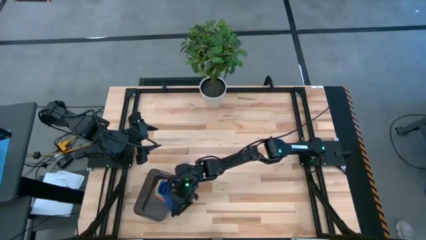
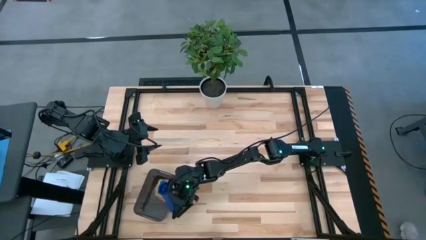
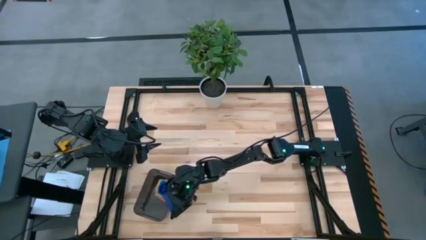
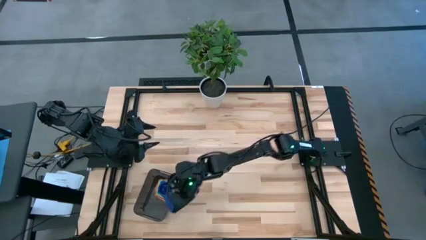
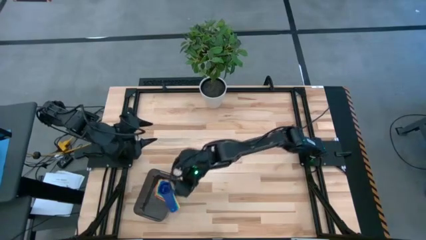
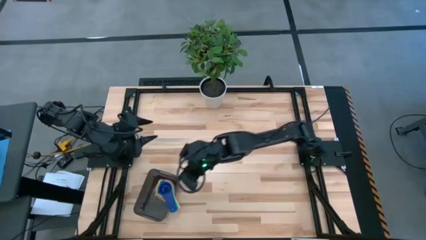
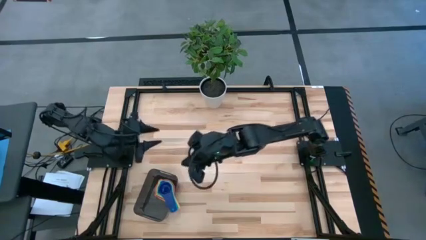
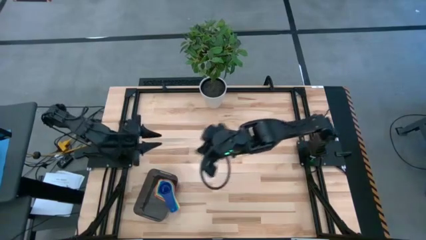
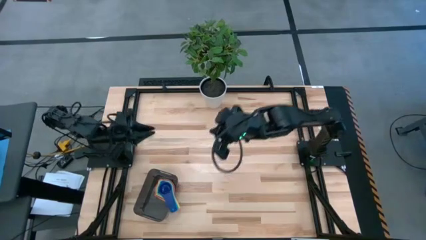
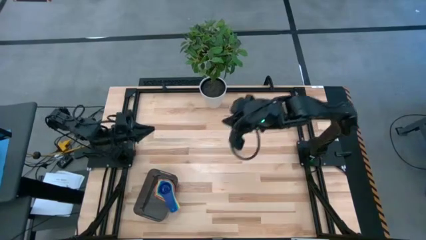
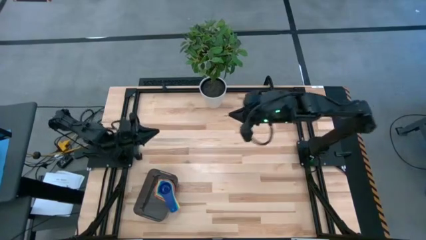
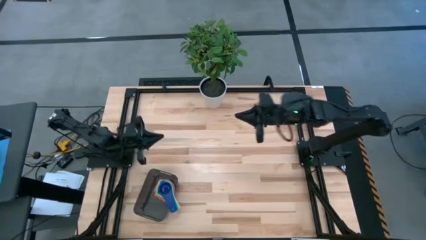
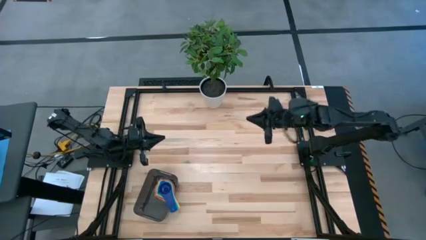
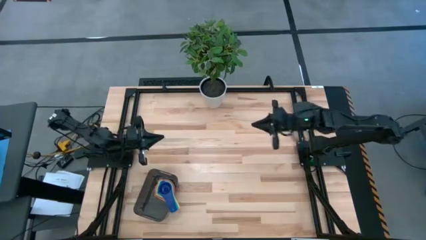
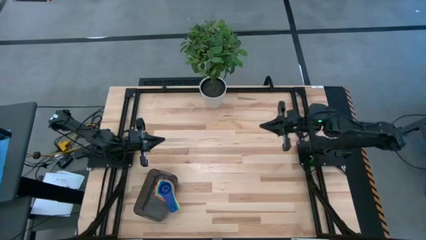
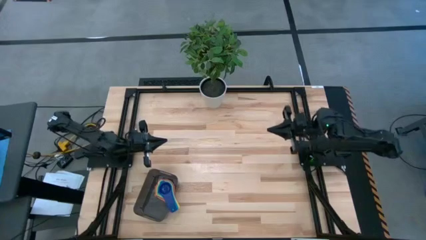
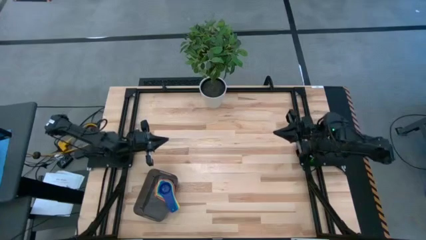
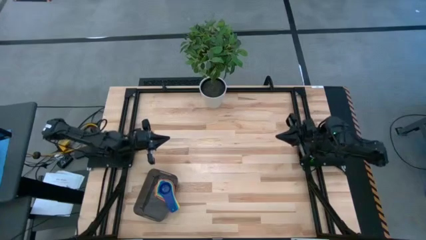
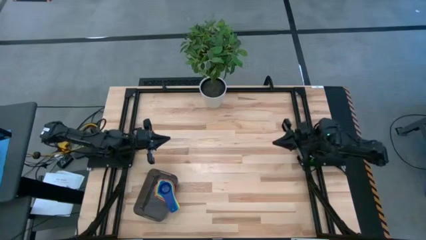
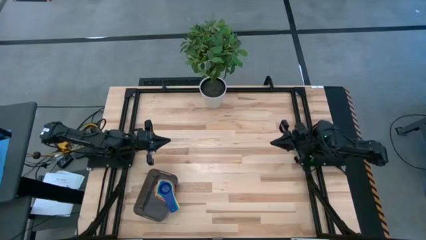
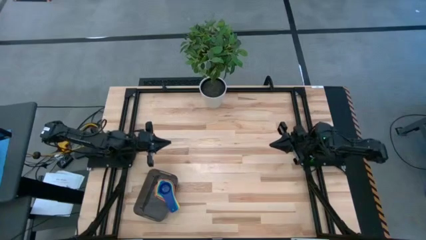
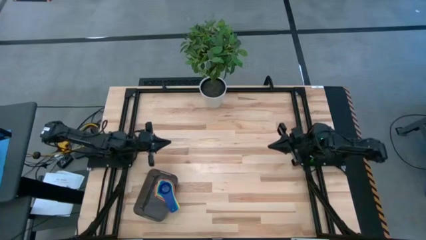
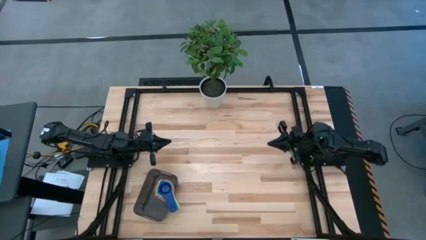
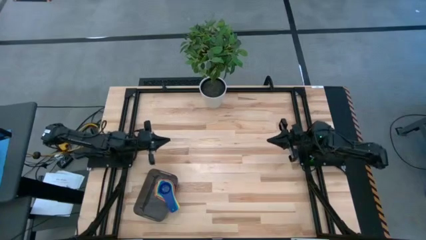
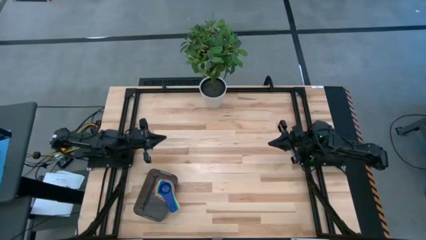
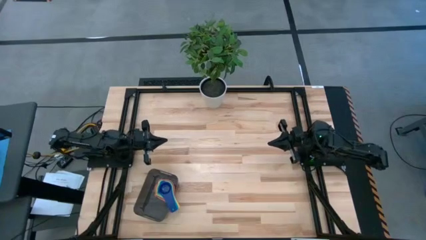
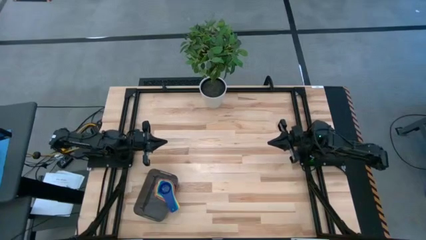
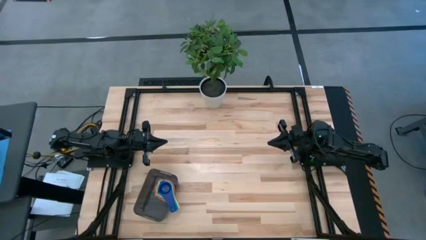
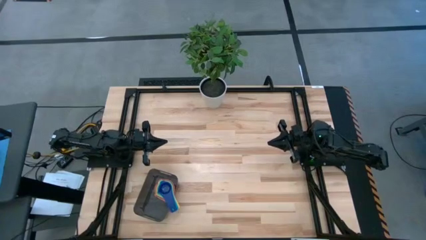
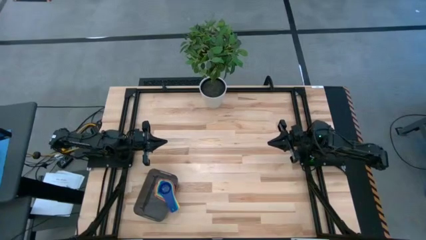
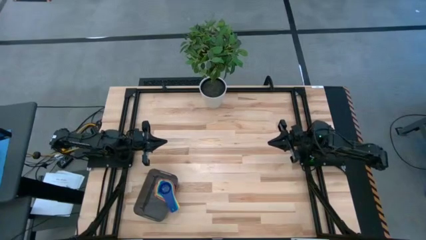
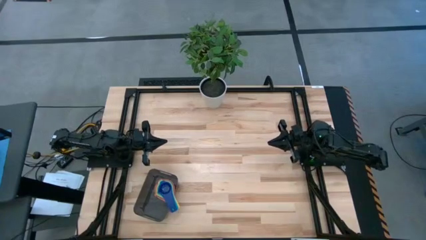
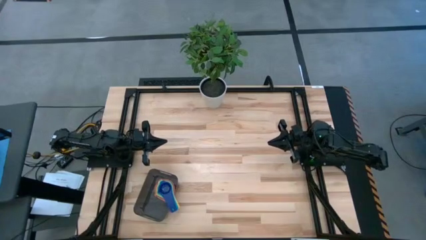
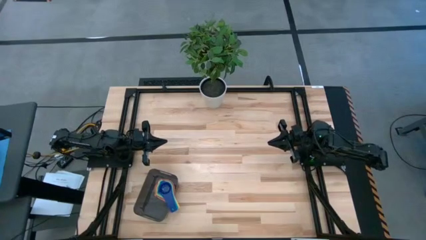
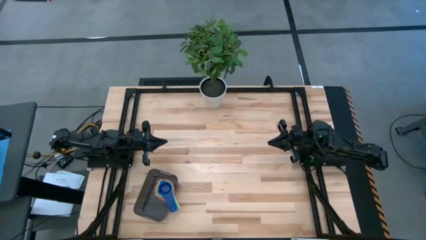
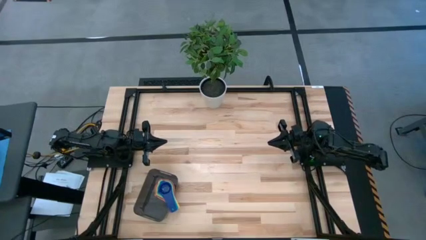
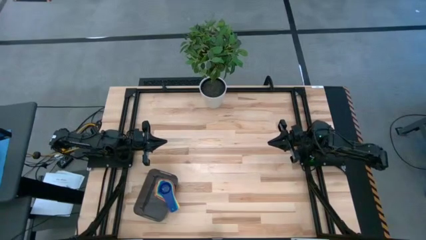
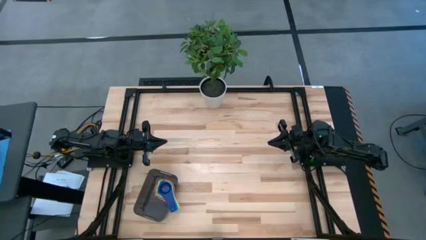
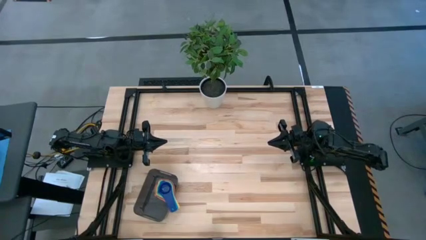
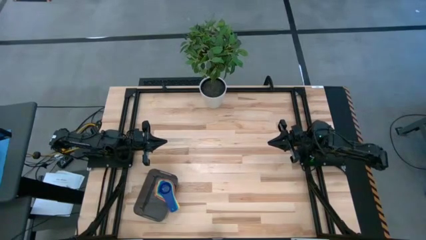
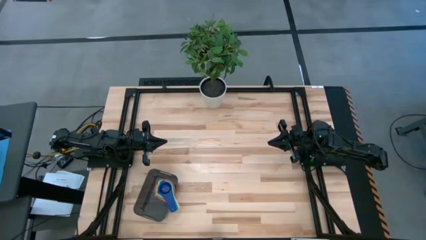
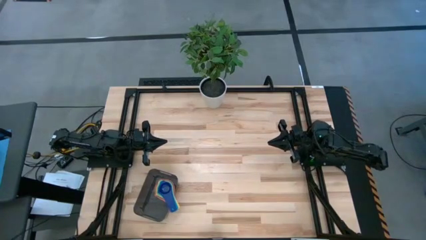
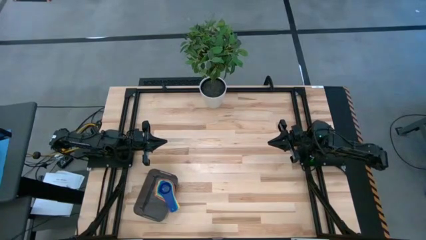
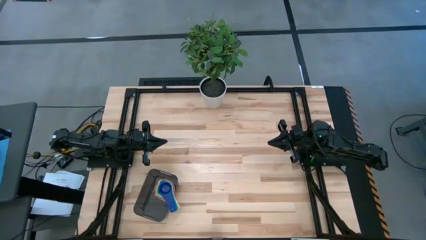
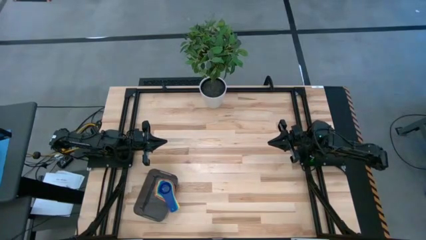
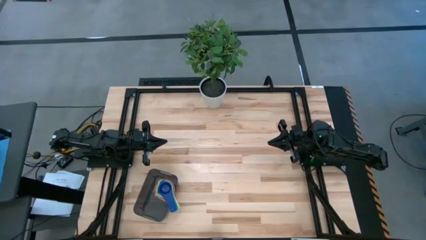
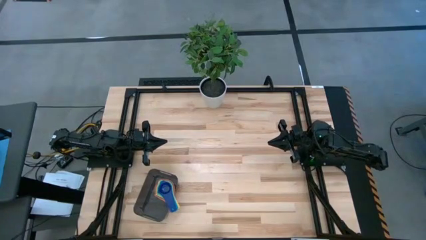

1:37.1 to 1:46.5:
Task: Nest measuring cups in basket
Return to Home Position

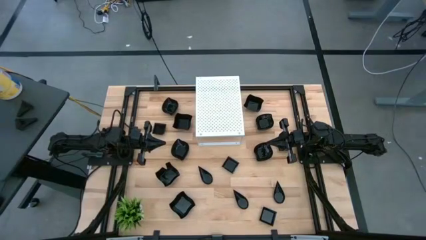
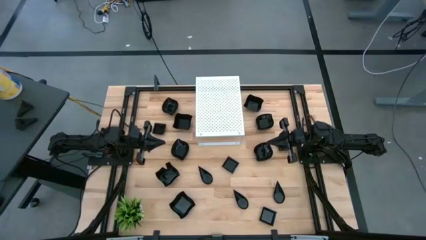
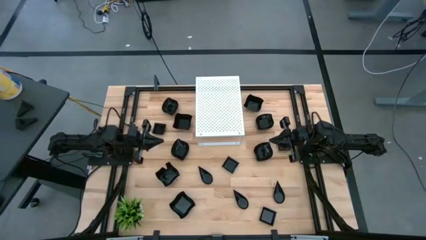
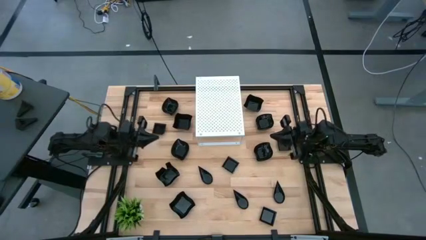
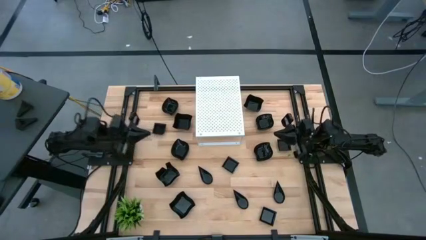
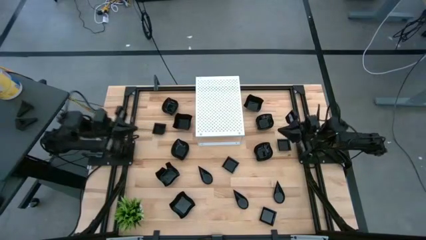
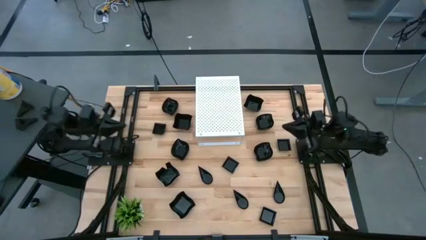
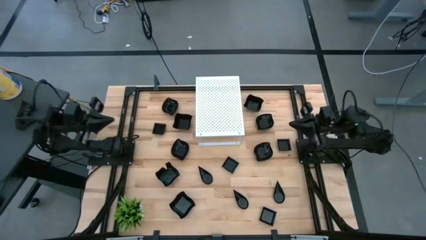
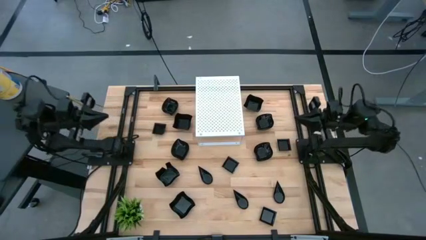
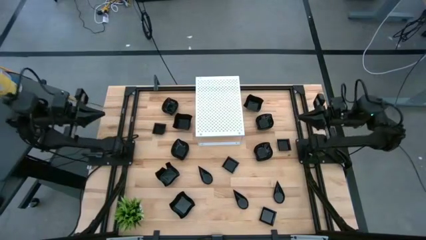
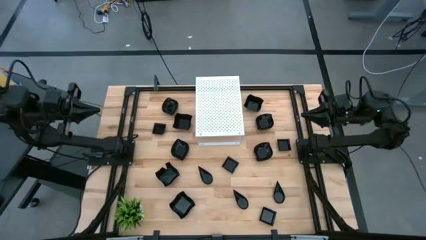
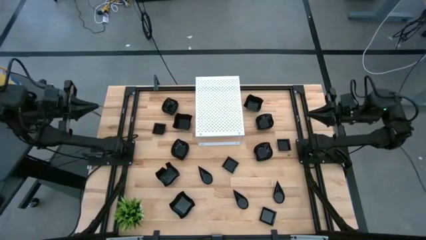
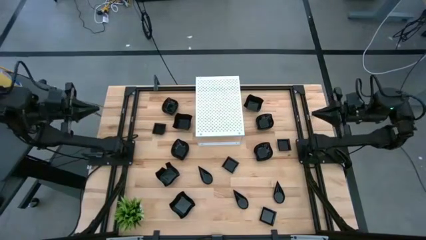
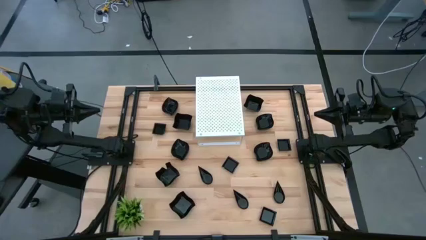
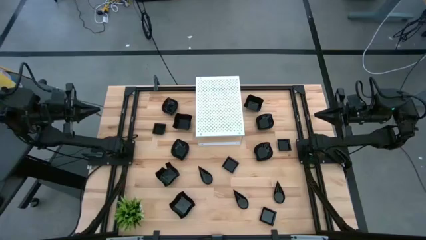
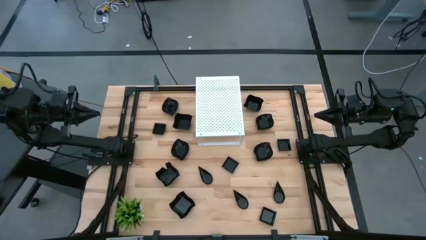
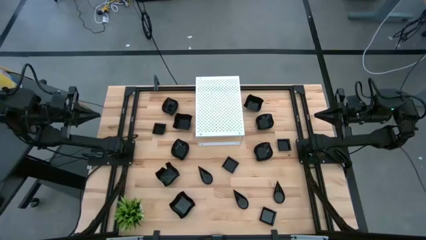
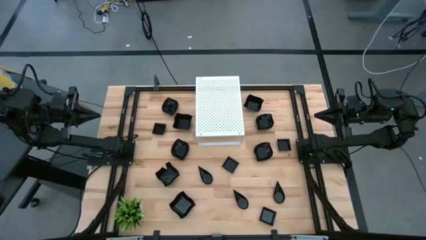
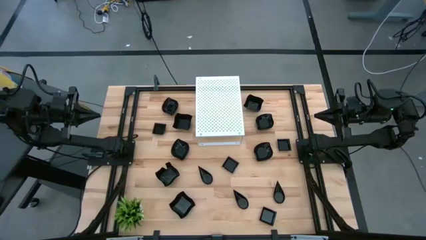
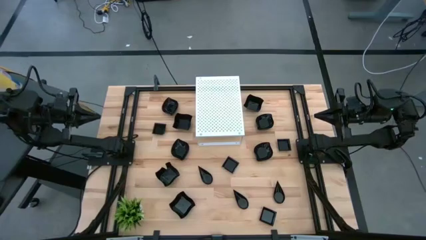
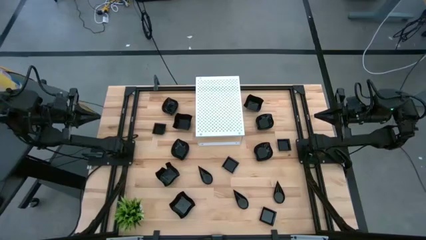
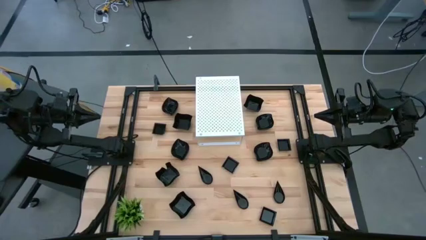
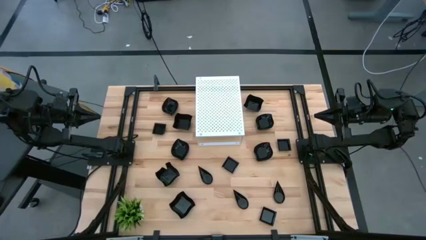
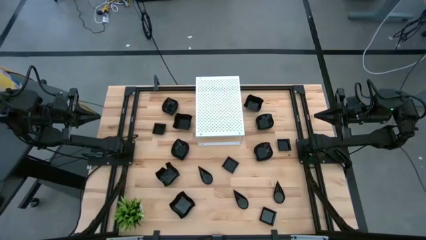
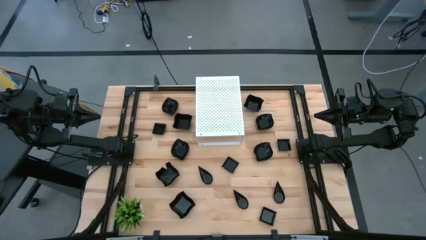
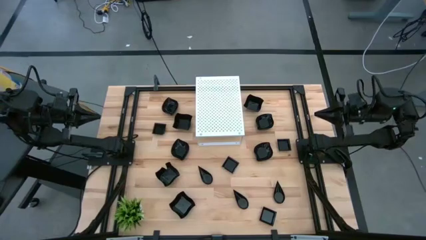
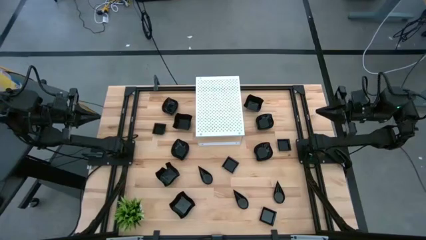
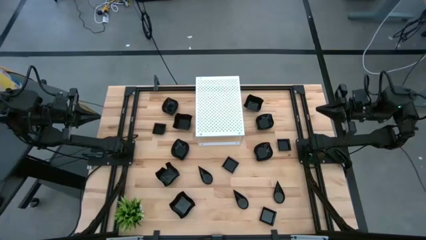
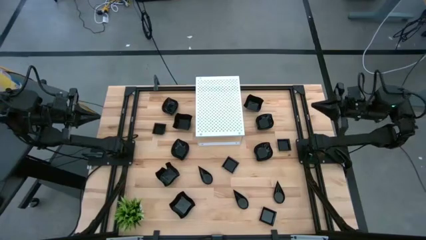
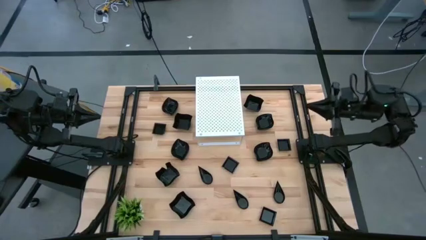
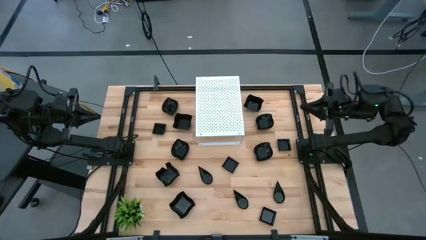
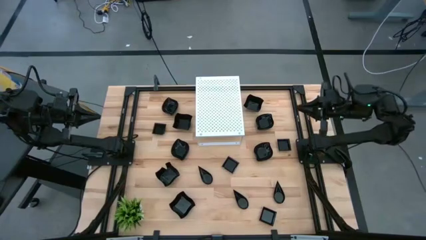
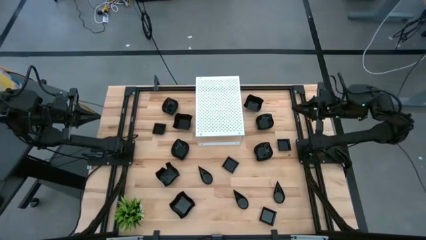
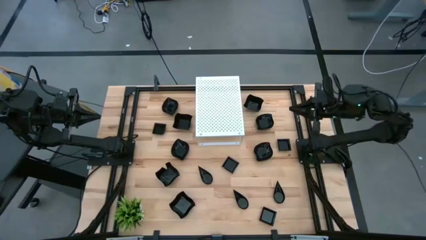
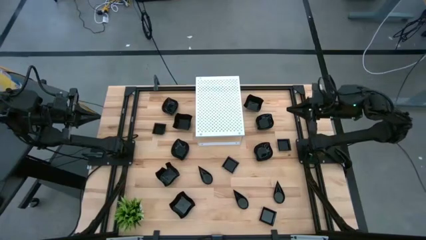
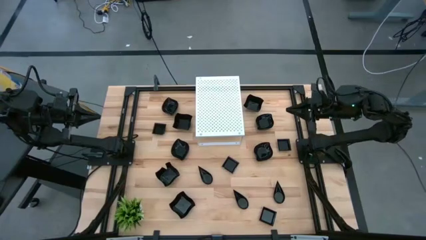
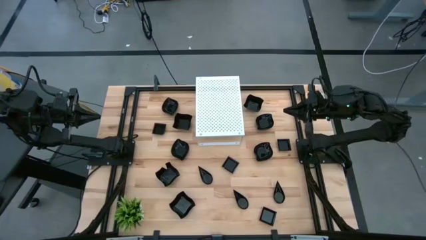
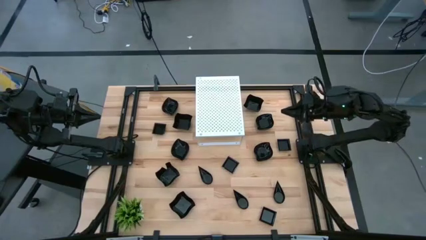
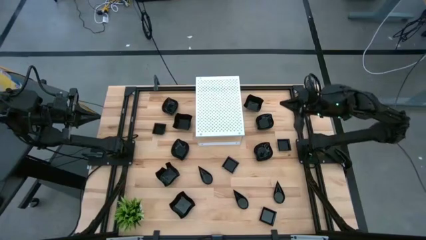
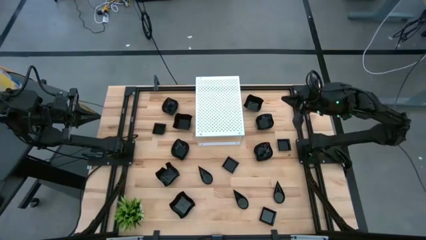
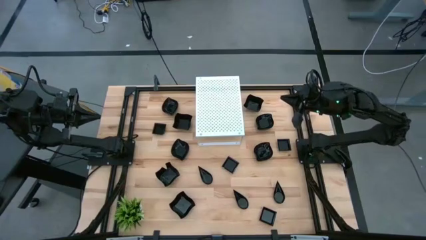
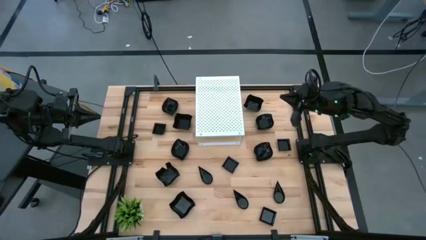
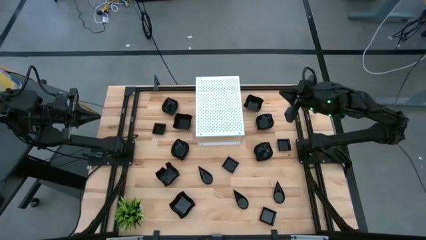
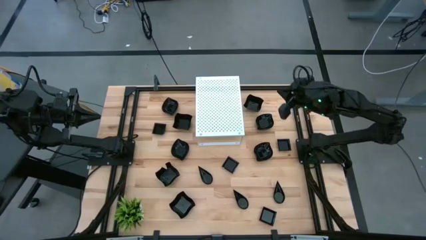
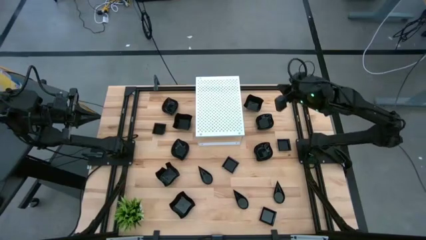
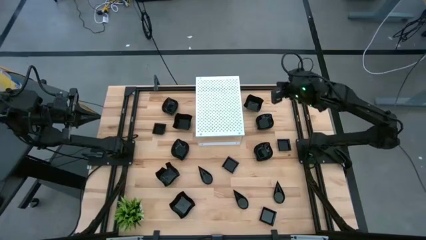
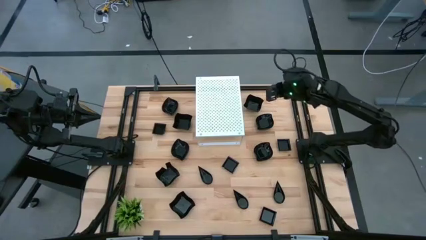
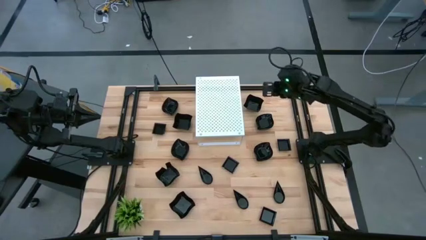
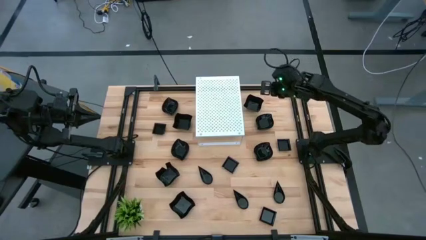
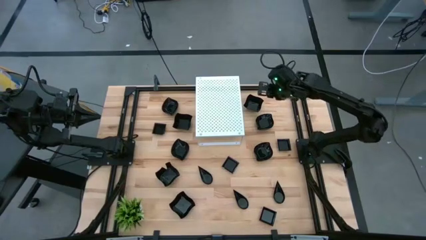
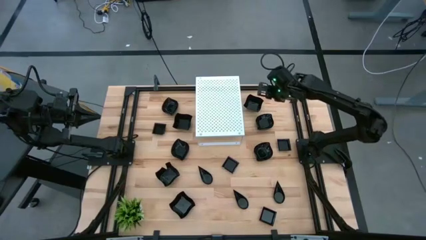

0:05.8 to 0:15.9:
Task: Pick & Place Mini shaped plates
Put the distorted square plate on the shelf
